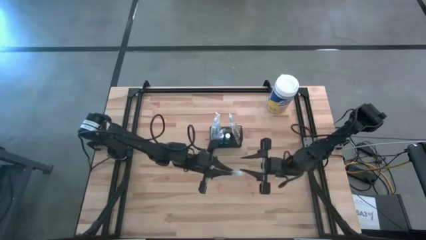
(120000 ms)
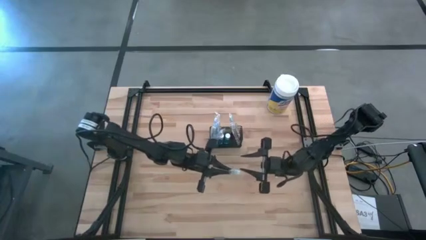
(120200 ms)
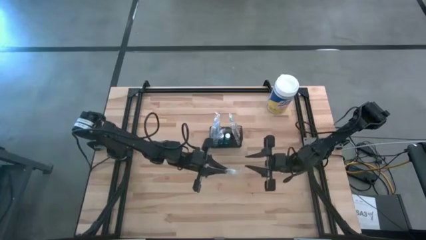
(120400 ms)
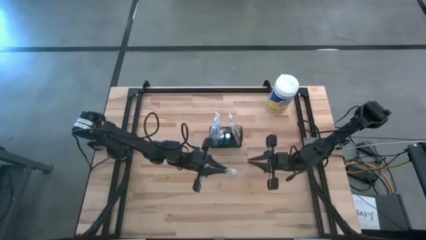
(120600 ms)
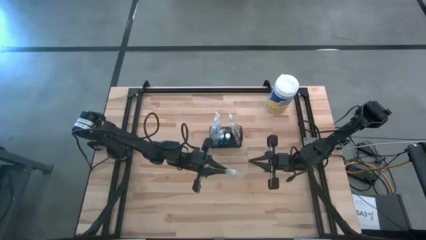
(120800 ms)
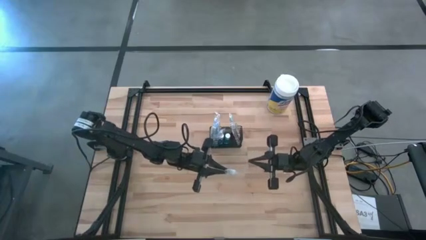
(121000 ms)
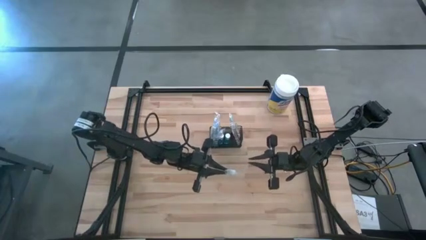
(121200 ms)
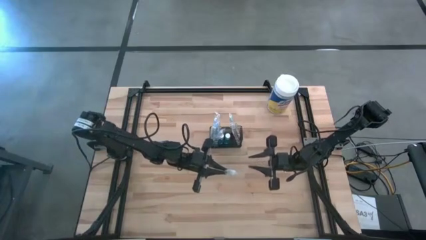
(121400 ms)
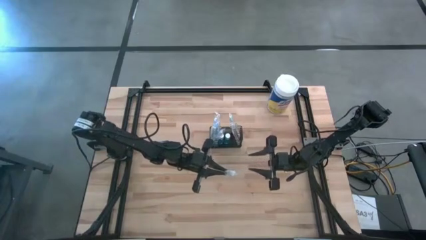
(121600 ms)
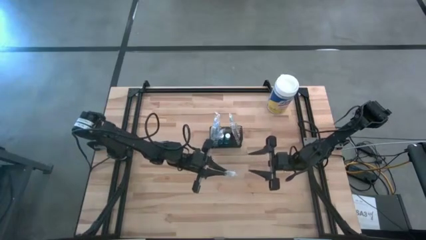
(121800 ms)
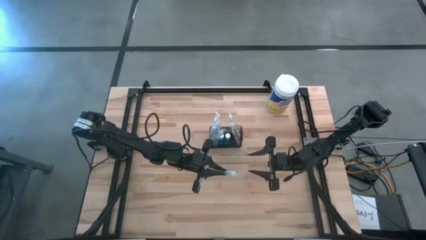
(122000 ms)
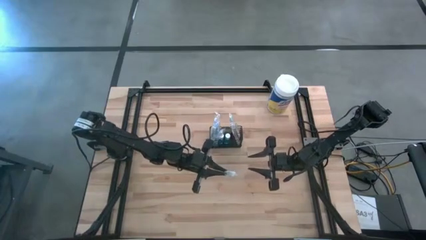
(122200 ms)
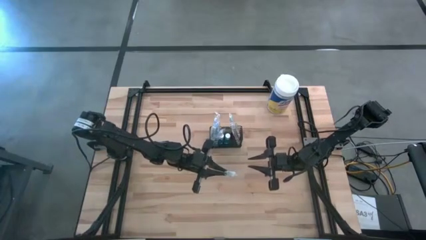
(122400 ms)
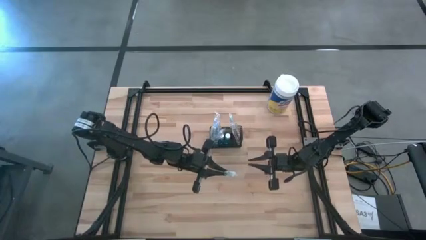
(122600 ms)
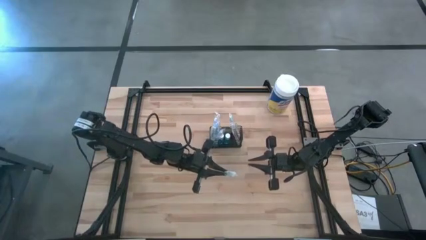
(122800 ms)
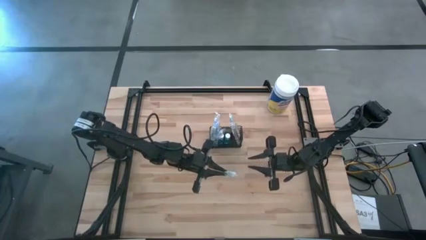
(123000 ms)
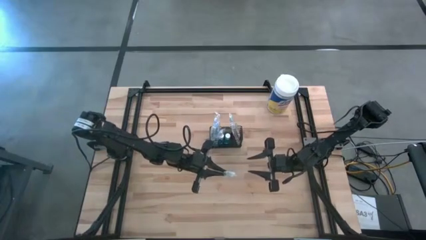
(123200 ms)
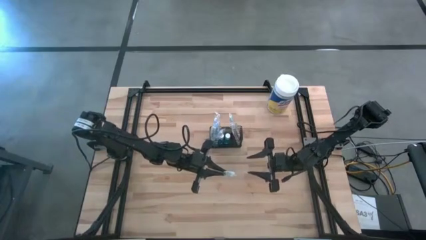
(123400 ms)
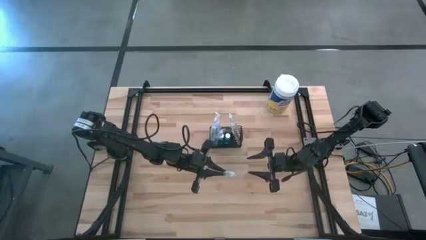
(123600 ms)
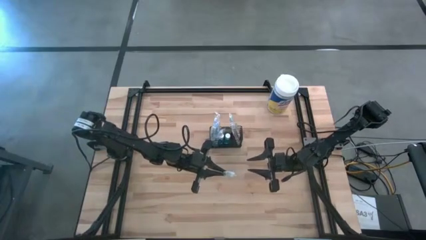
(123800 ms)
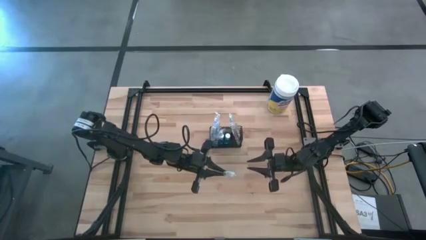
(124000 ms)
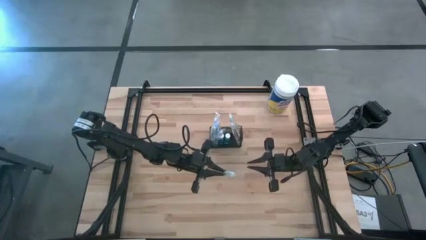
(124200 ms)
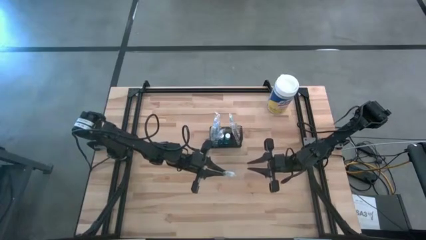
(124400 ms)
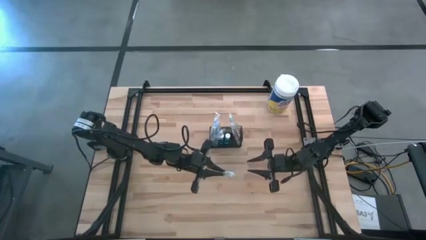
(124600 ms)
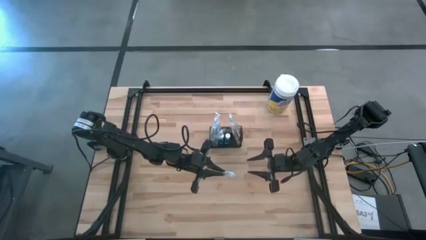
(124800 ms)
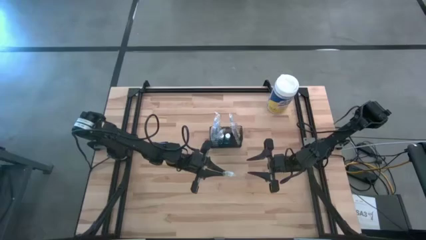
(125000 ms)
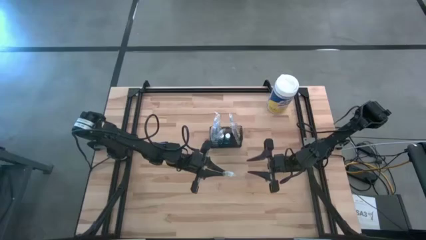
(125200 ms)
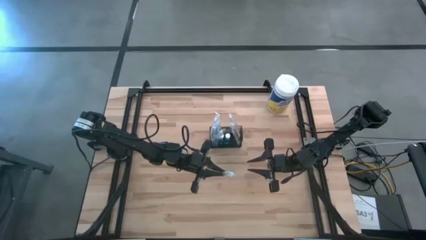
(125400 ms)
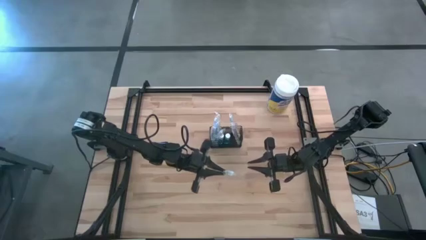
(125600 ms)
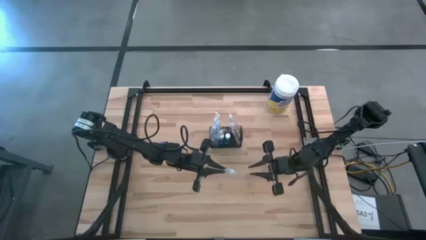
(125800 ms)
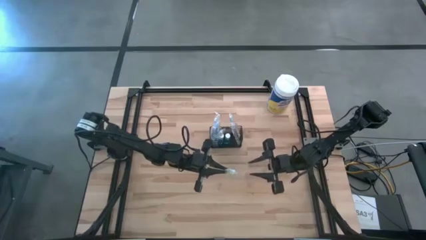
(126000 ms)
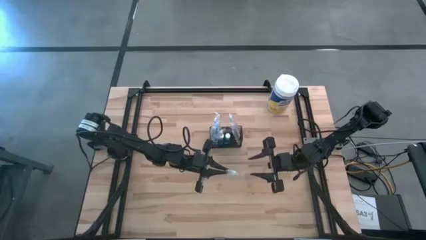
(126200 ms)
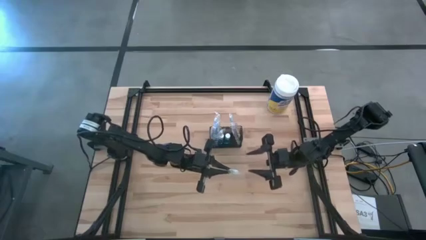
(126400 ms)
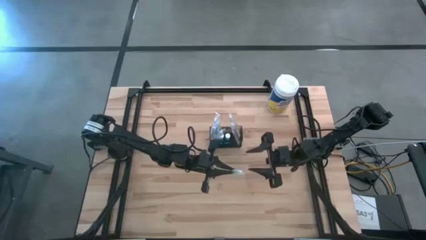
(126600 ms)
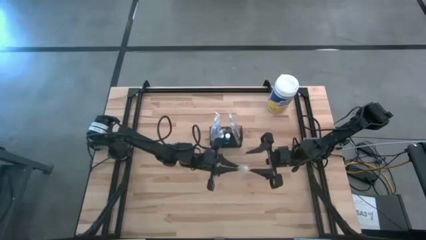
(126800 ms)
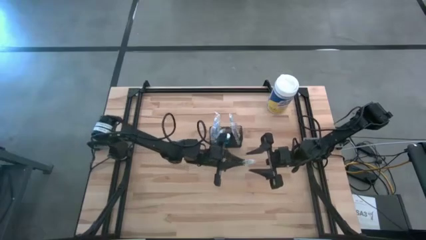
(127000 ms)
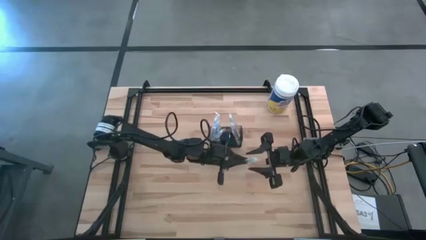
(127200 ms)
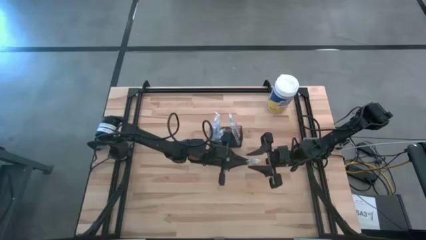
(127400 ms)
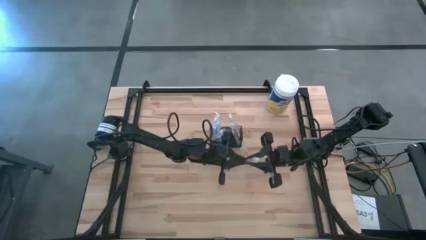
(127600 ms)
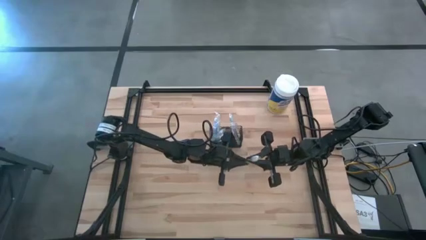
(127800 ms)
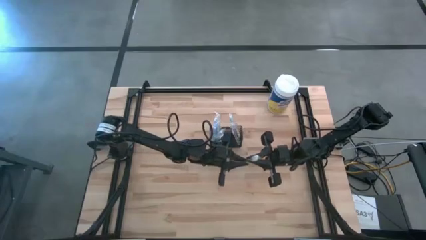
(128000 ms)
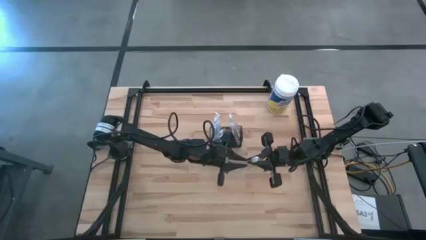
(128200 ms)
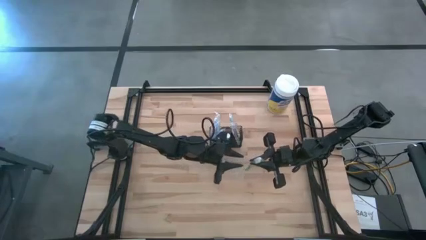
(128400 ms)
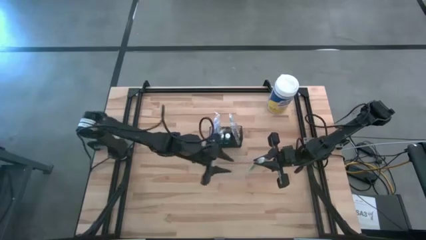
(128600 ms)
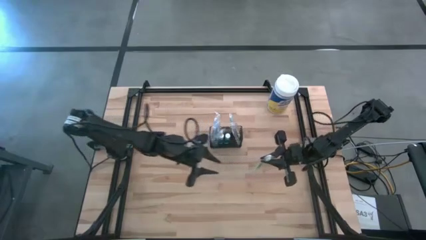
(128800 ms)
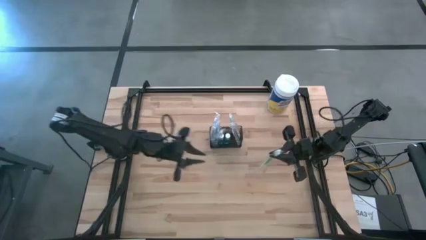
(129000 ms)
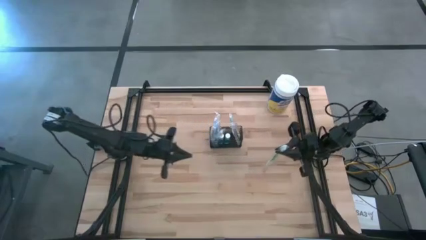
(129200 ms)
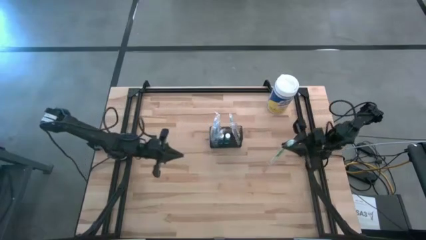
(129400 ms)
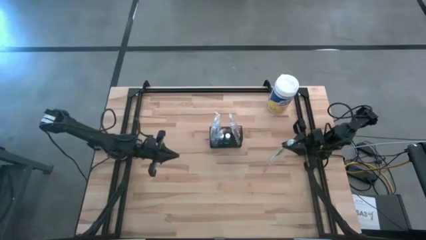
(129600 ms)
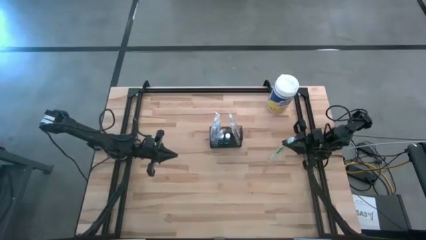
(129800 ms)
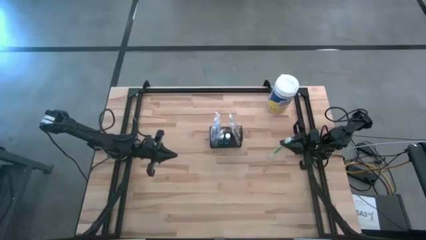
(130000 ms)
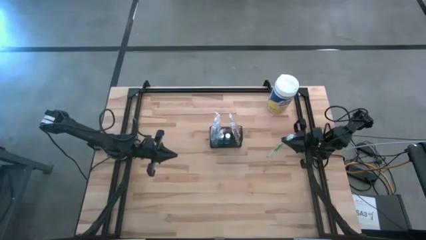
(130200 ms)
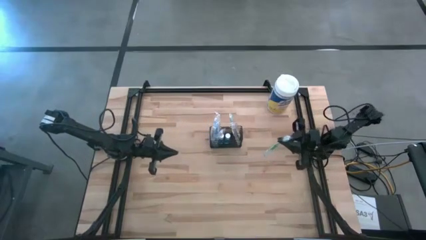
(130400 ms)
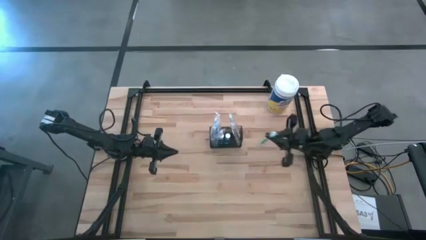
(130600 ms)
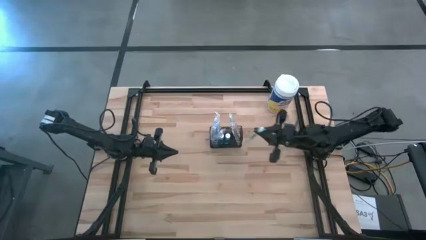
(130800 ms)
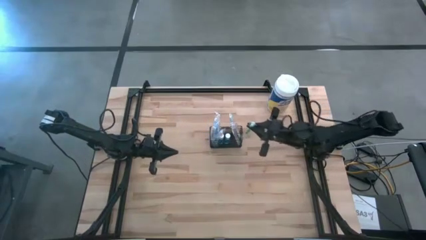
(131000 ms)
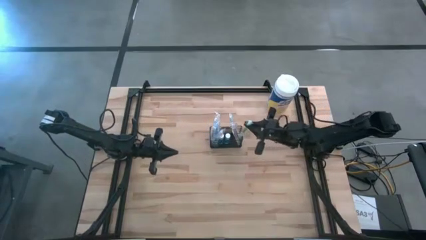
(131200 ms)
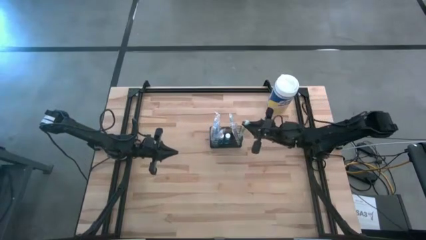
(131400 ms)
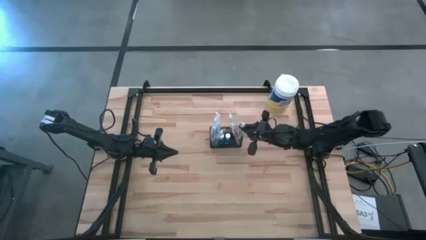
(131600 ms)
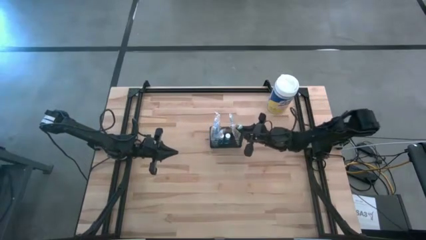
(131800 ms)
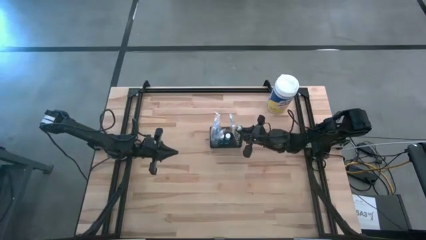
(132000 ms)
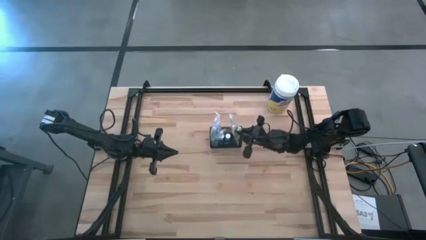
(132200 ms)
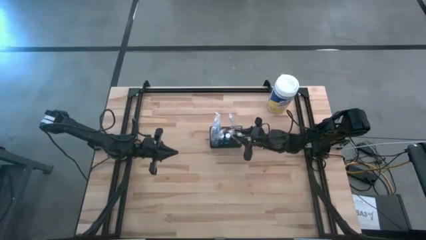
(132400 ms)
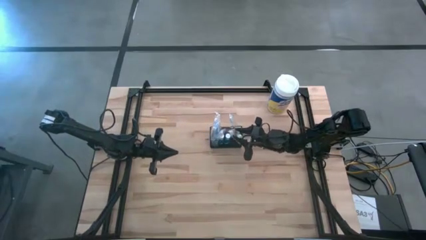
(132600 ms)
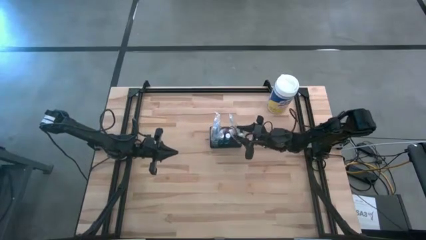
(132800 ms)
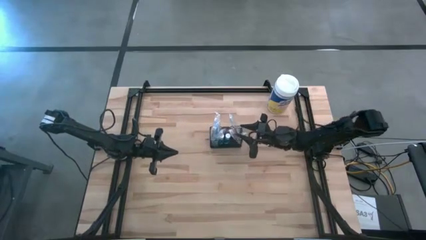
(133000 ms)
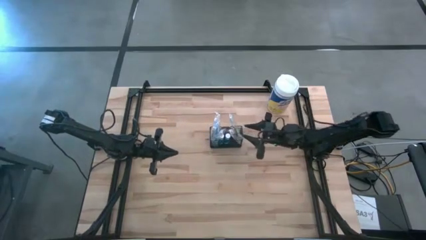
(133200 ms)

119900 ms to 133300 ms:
Task: Pick & Place toothbrushing station
Put the green toothbrush into the black wire organizer

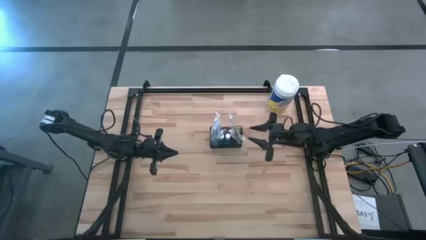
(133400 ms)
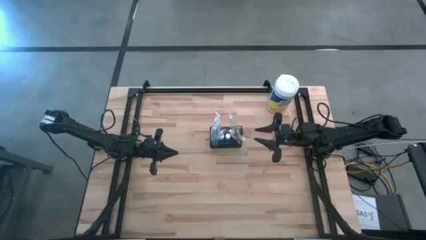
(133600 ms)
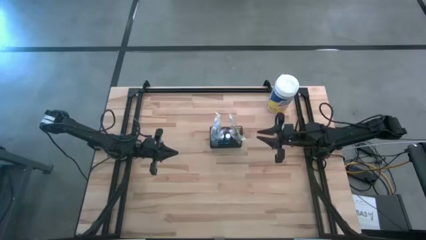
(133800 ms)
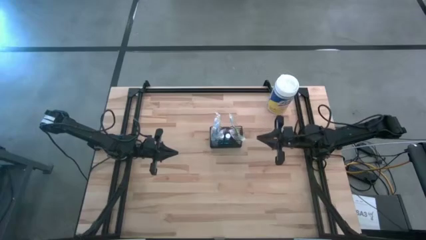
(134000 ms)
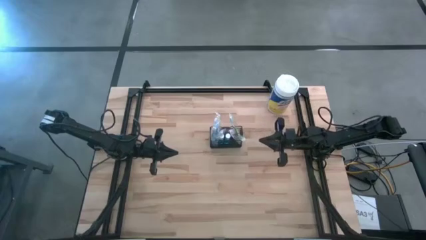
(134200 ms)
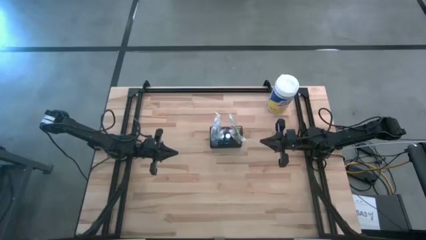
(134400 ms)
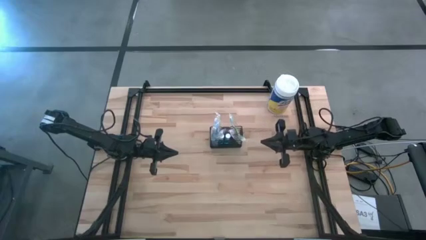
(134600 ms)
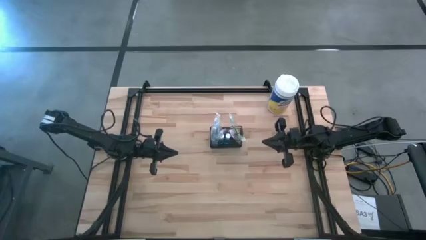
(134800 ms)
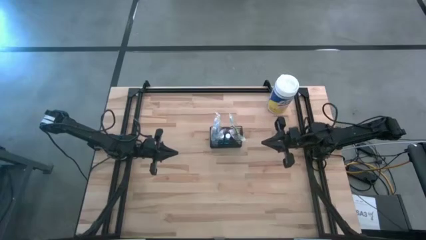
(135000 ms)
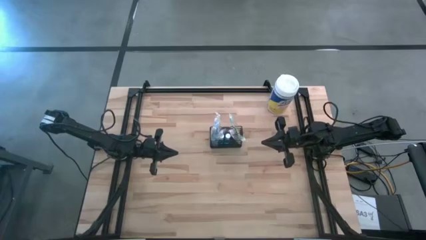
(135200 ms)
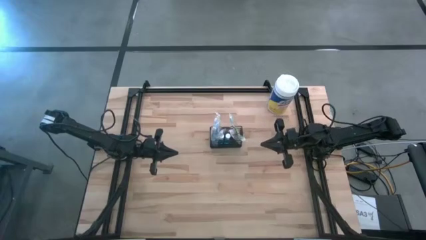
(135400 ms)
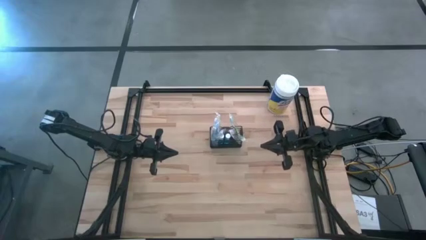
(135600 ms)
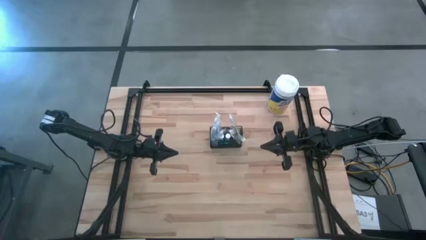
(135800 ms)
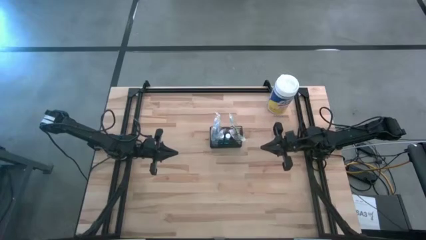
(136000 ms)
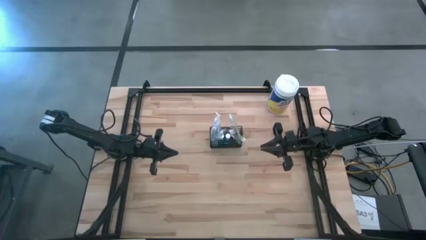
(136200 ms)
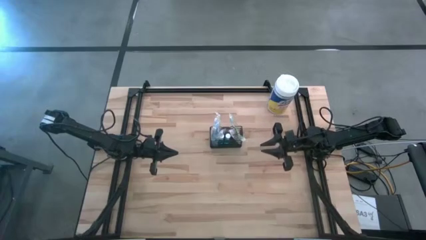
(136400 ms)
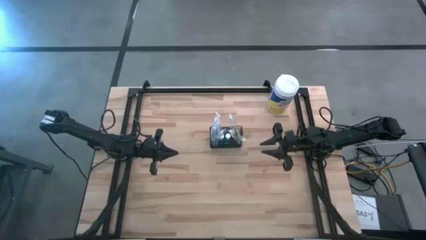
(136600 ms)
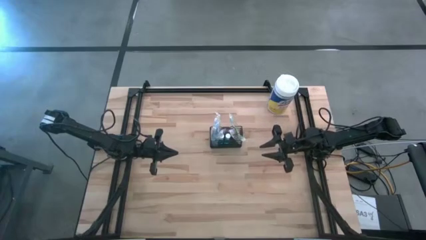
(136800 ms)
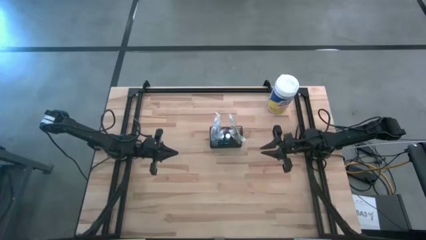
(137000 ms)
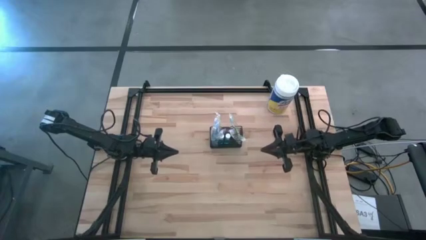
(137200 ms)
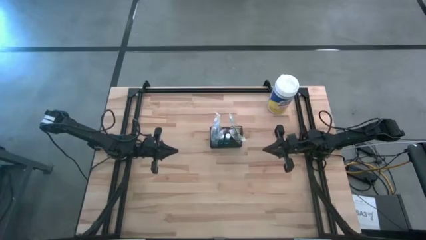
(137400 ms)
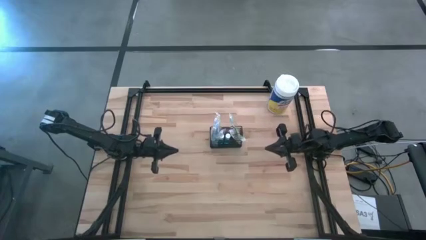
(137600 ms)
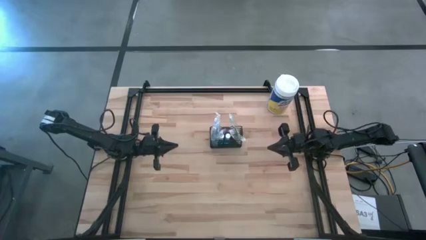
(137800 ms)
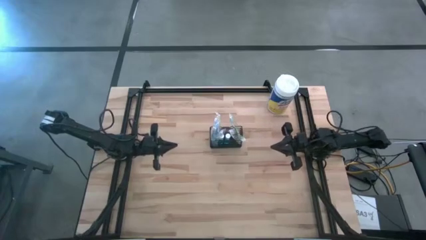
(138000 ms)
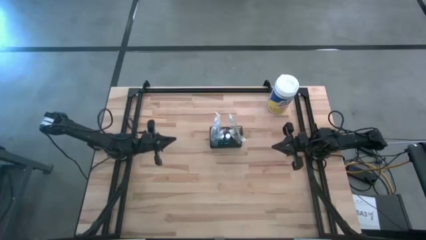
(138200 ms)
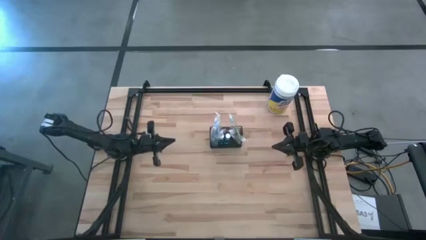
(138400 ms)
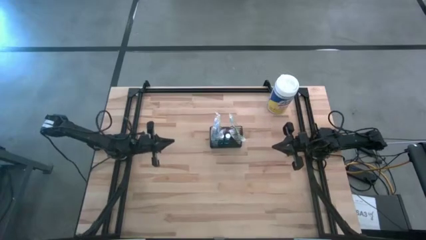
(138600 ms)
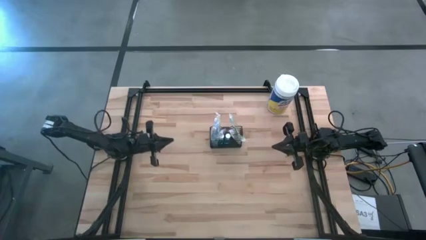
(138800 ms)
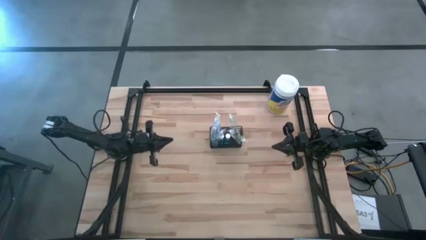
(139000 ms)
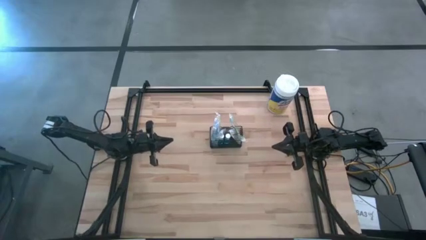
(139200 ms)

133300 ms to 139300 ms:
Return to Home Position
